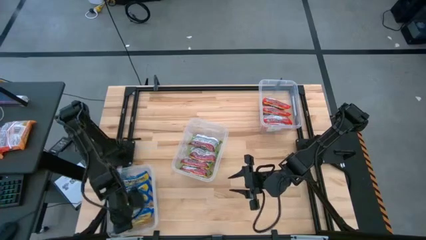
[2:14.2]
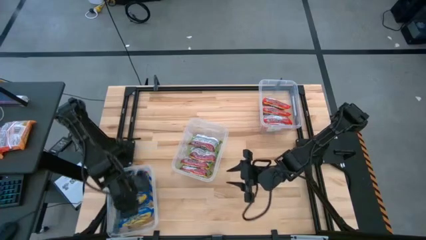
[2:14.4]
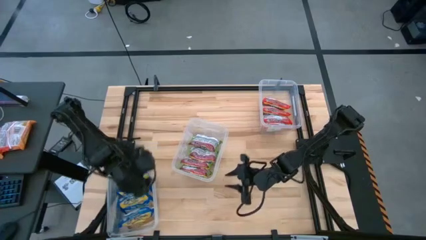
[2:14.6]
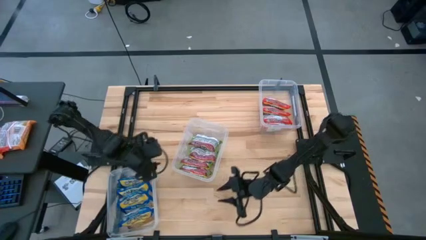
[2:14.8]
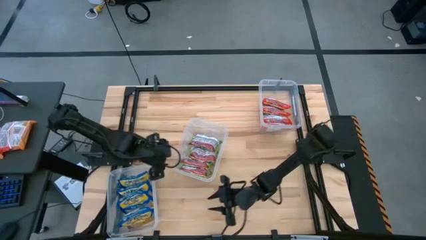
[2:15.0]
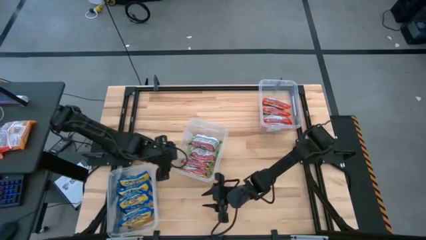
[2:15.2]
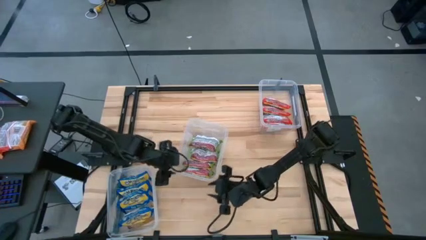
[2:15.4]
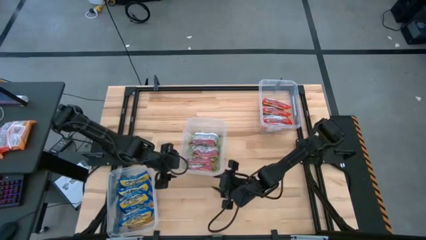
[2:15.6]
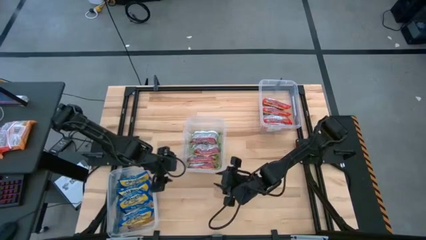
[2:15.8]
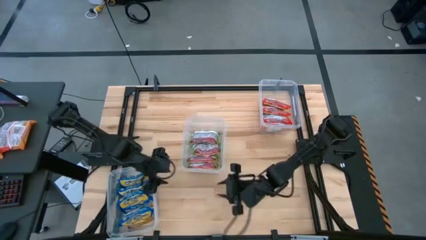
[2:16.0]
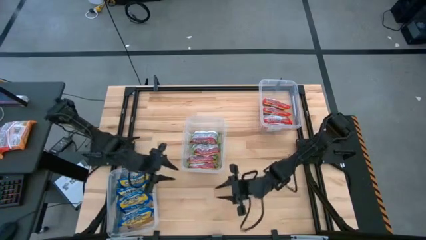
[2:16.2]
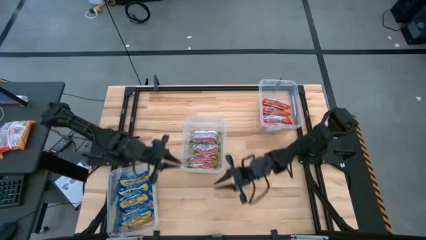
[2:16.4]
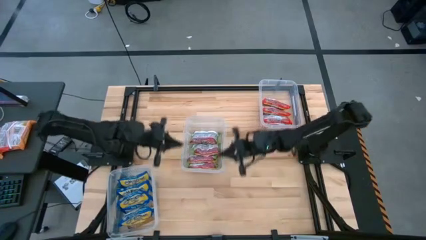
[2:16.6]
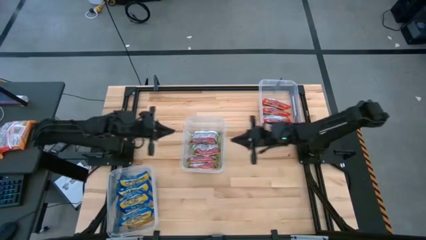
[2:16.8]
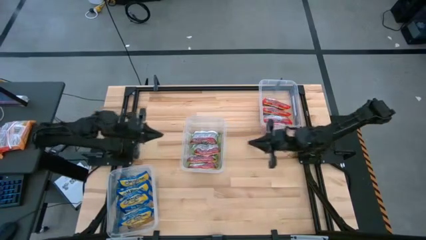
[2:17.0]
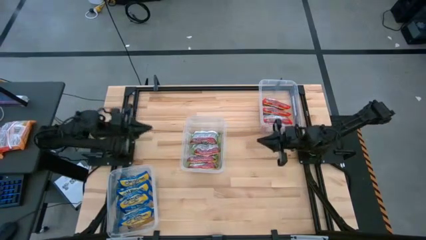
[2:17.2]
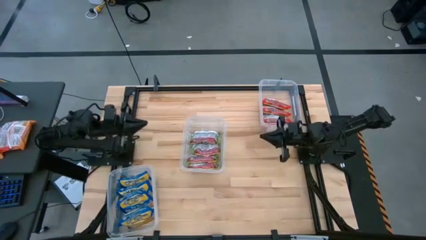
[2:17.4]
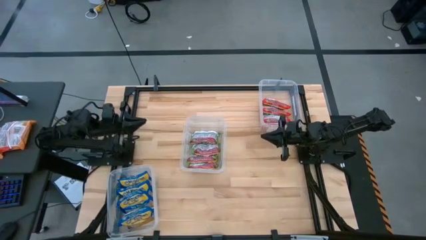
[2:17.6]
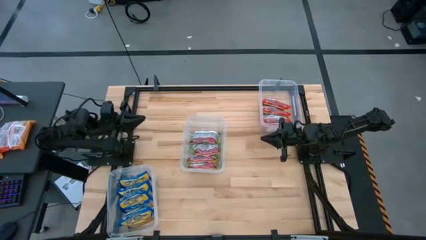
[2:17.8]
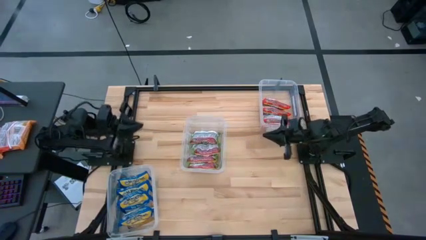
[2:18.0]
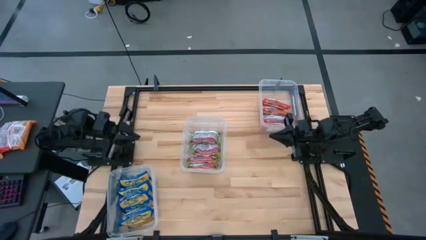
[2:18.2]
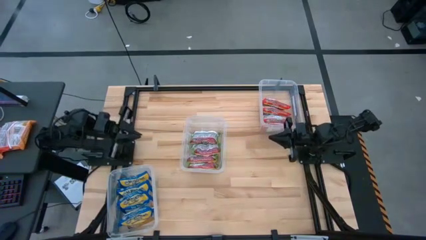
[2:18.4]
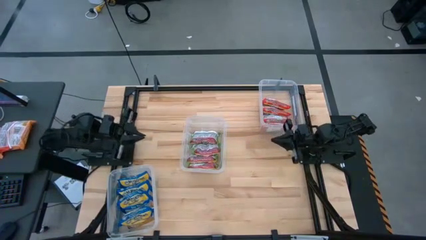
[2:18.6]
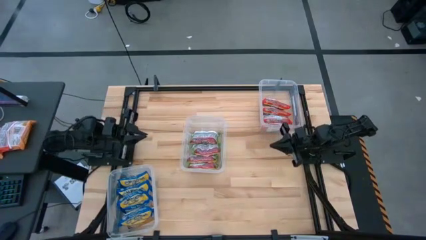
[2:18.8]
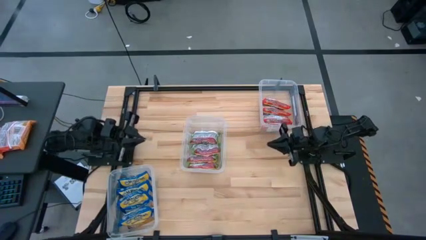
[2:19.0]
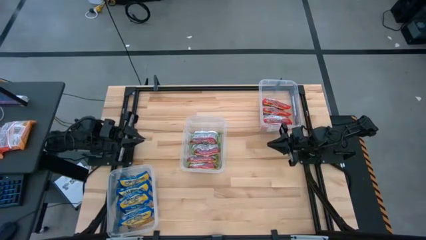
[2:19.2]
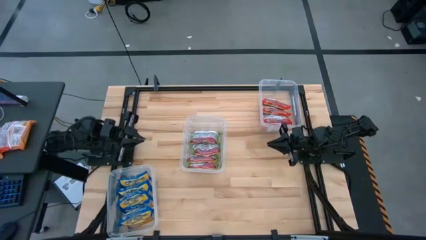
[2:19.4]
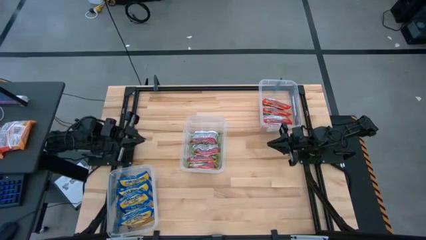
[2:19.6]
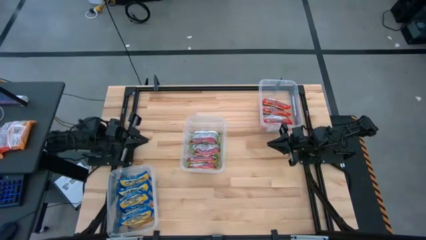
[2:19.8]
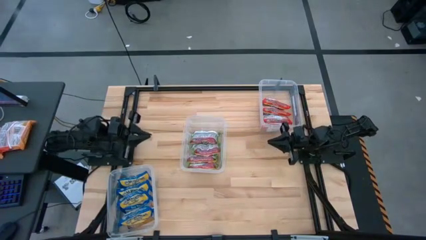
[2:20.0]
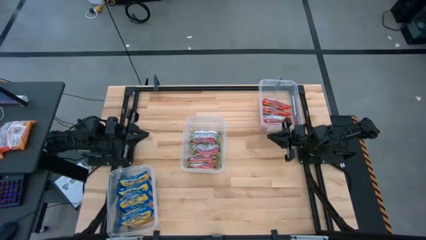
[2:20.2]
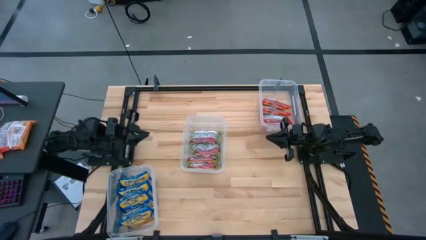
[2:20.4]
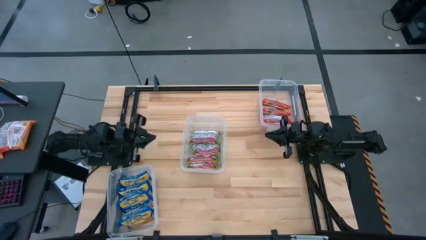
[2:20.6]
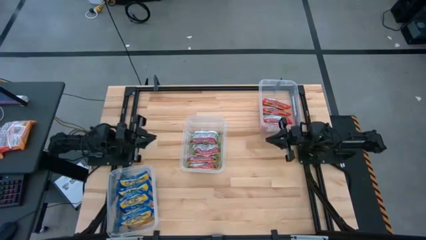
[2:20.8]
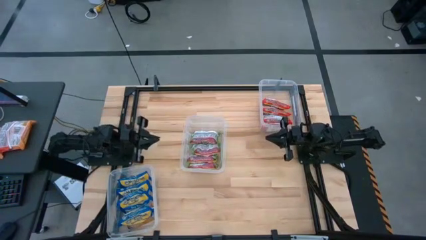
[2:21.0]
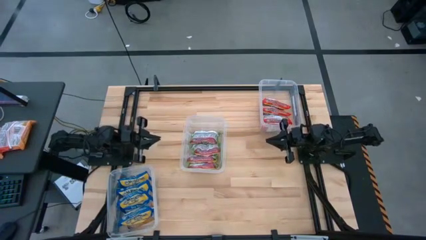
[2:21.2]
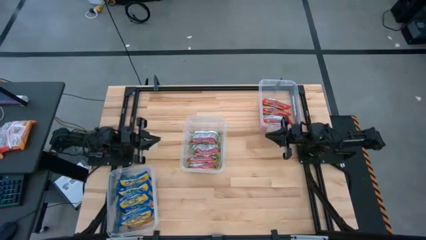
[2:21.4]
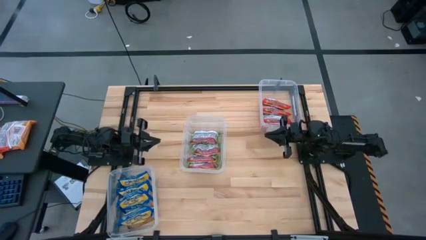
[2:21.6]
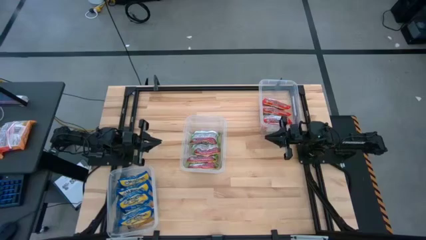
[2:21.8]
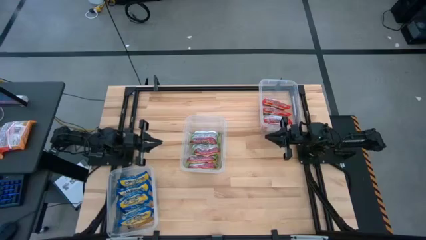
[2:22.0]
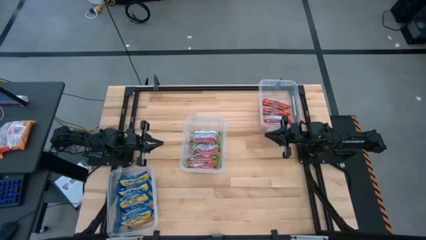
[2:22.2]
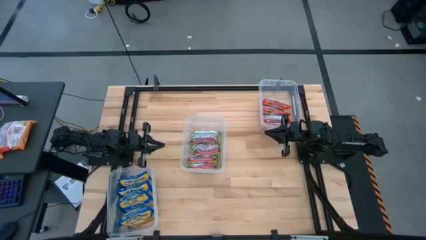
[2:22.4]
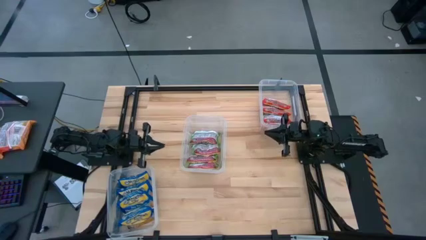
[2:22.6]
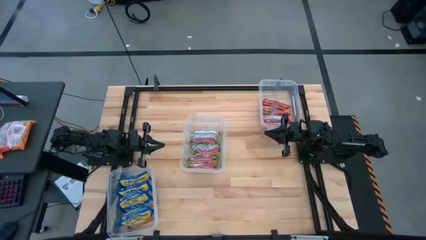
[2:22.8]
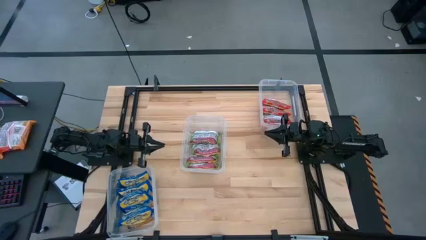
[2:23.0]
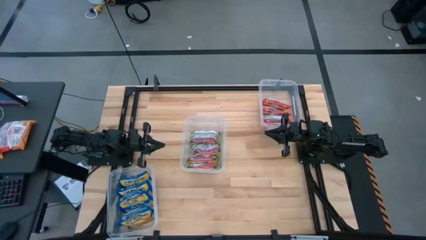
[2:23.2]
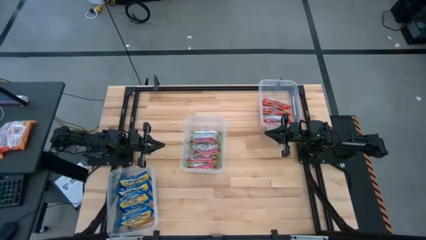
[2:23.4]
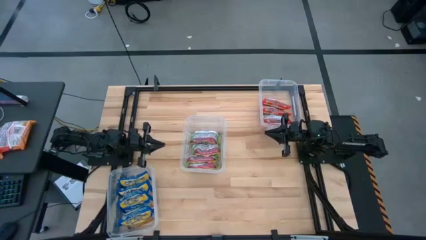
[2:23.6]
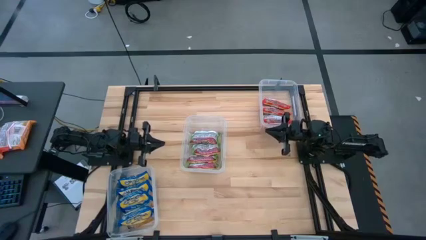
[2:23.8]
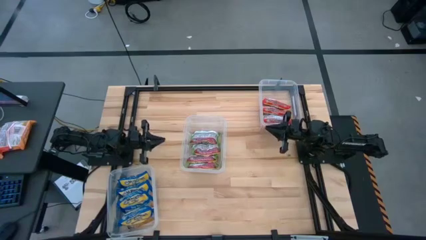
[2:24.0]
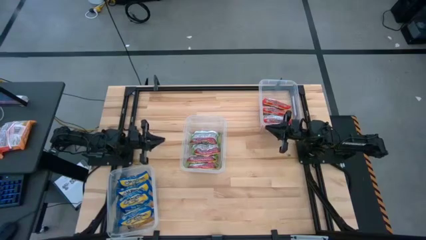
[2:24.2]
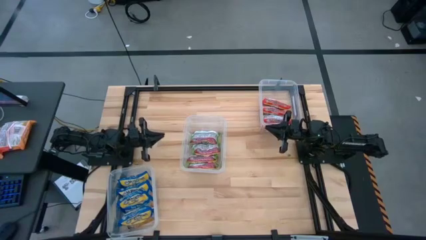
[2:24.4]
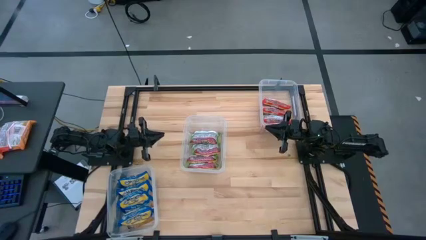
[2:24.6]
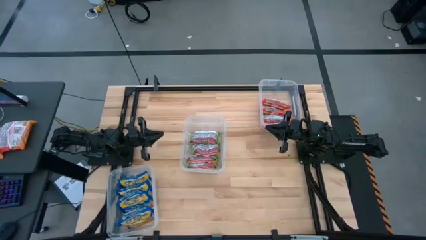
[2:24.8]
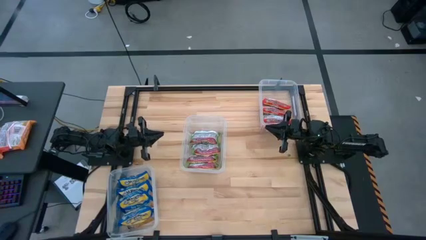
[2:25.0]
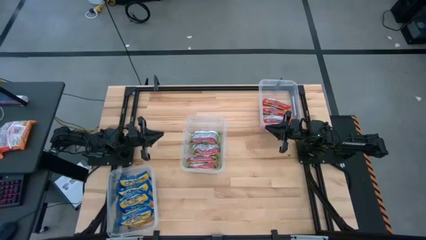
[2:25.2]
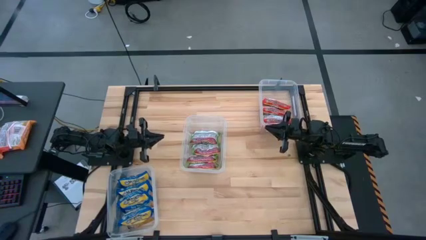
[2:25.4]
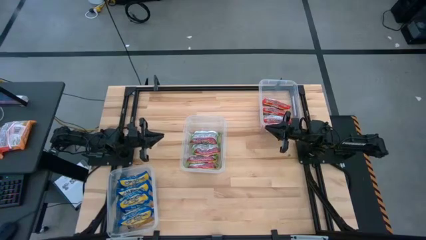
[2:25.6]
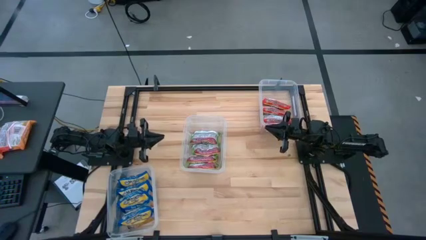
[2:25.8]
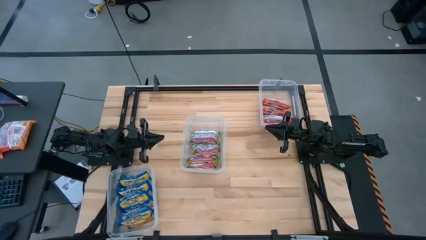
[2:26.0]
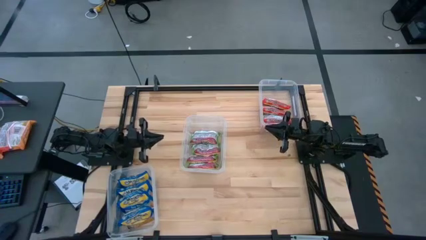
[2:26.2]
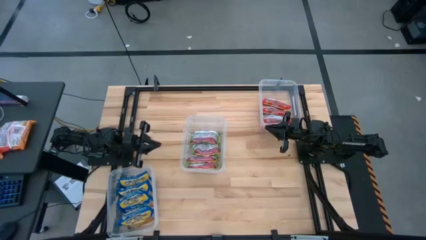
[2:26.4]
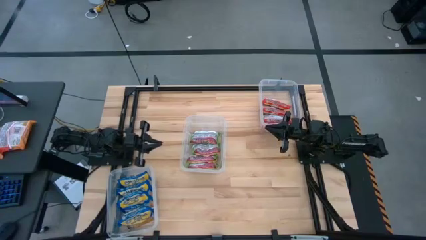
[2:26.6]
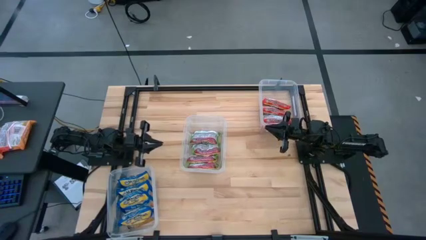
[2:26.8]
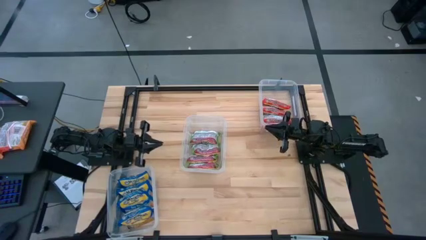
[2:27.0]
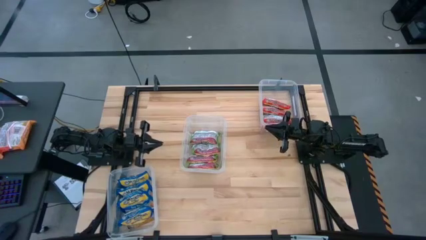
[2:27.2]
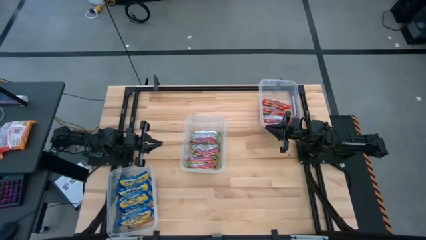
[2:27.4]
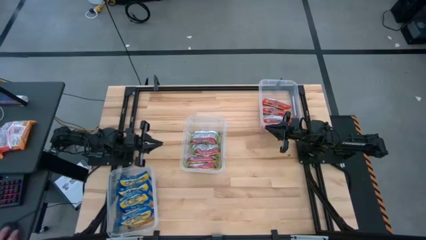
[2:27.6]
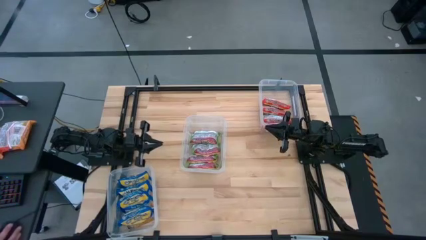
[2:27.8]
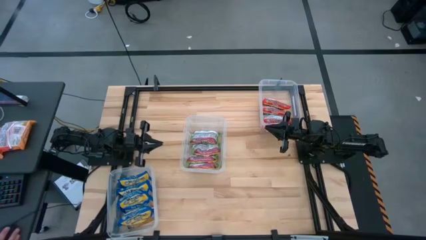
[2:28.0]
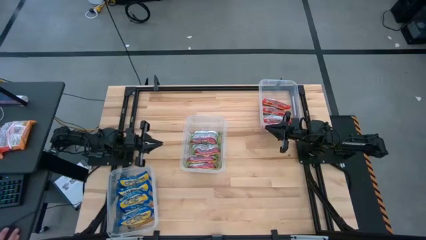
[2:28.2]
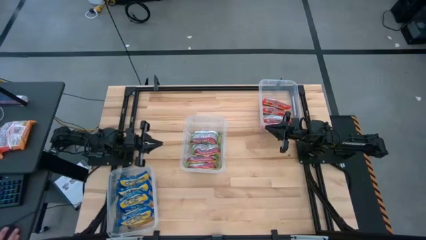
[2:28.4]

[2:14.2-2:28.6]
Task: Sort Maruchan noodles
Return to Home Position

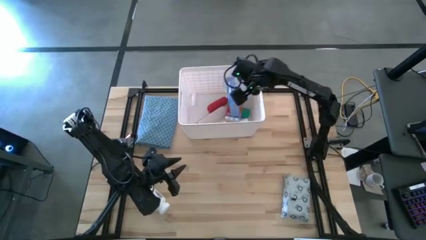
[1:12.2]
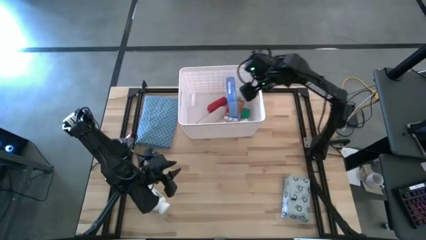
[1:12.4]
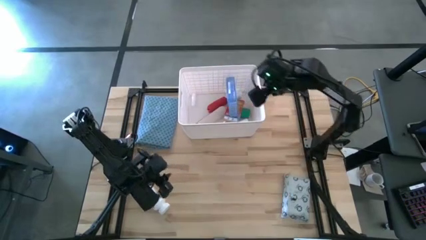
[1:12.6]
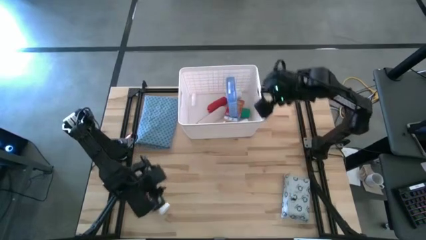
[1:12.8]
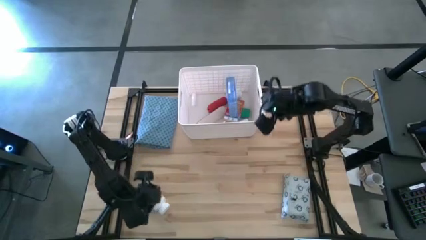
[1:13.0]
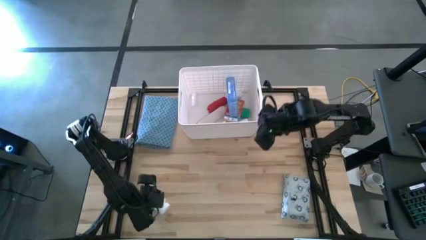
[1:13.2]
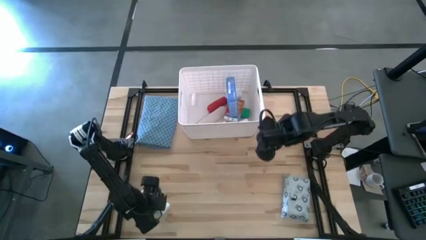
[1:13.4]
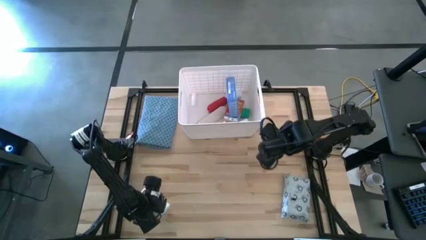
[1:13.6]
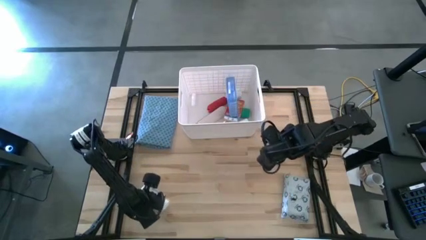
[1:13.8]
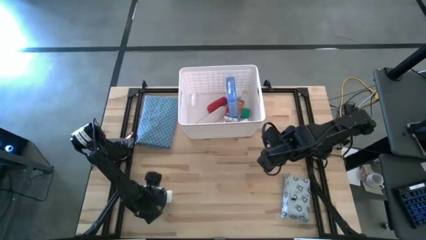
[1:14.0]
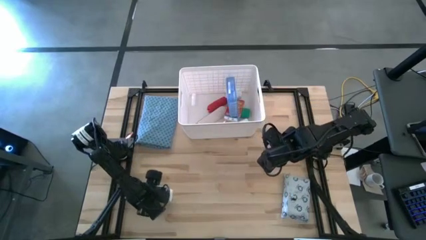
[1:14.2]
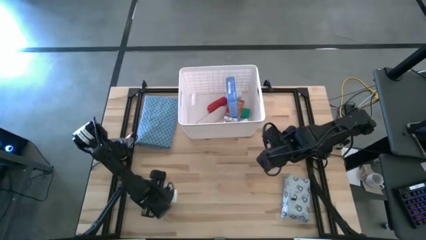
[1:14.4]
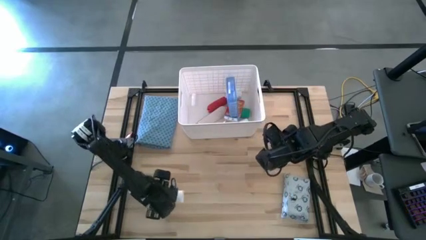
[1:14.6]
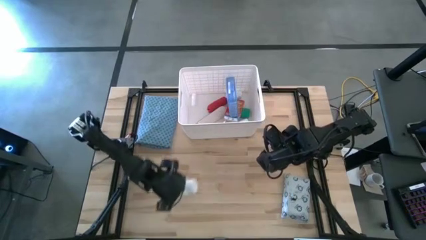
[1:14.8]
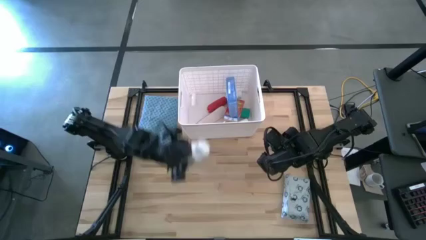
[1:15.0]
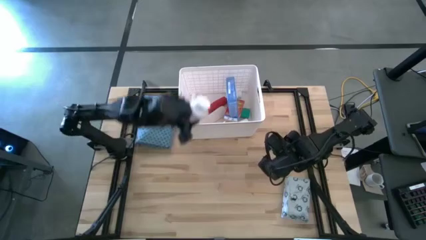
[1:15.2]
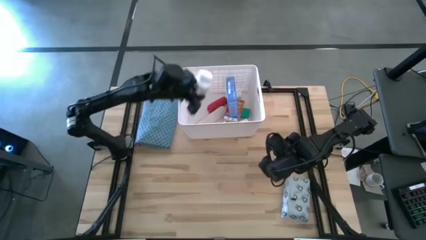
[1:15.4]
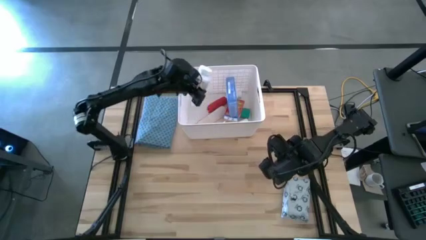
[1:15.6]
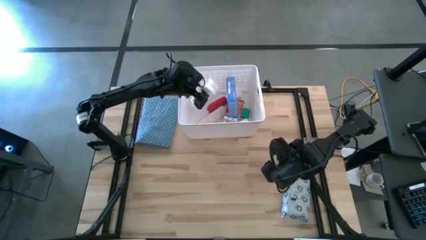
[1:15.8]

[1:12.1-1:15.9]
Task: Pick & place medical supplies in basket/bin
Put the white and purple medicine bottle into the white bin
